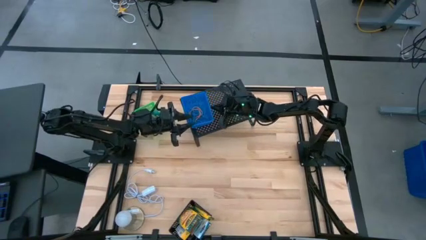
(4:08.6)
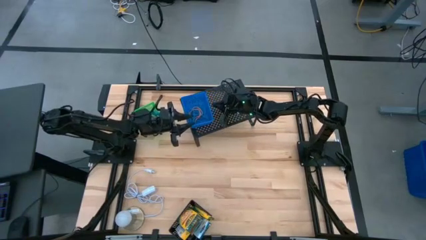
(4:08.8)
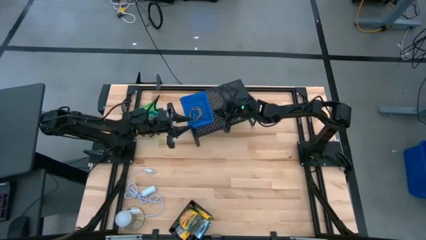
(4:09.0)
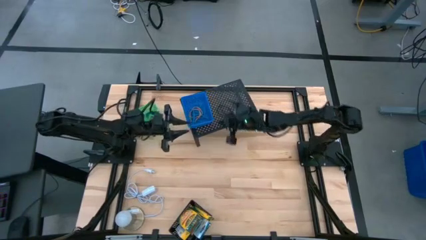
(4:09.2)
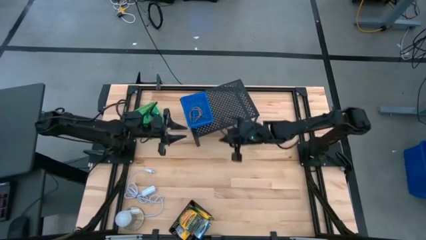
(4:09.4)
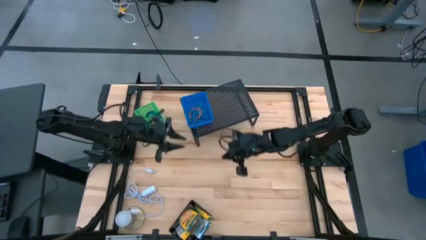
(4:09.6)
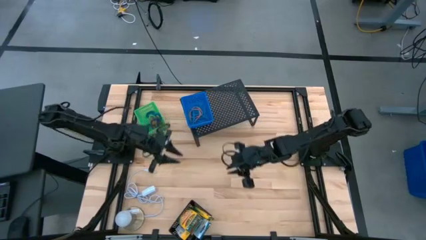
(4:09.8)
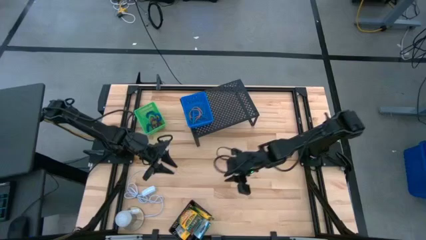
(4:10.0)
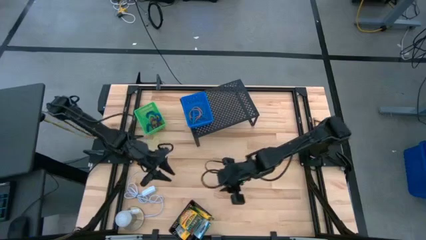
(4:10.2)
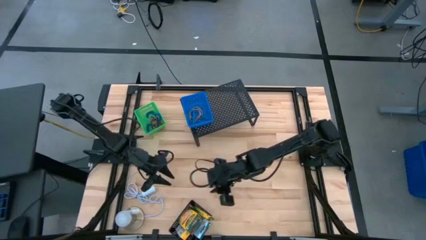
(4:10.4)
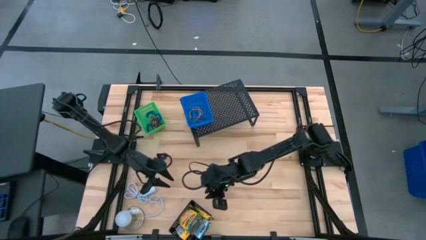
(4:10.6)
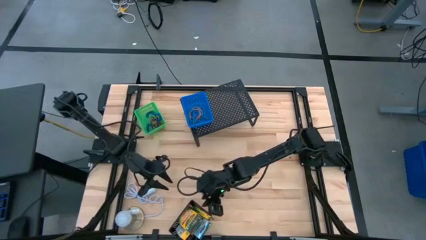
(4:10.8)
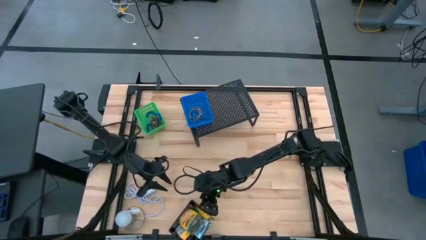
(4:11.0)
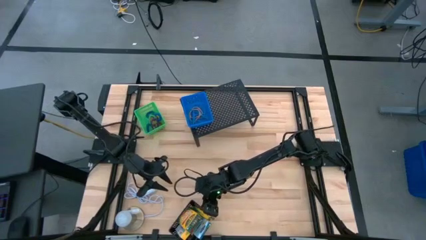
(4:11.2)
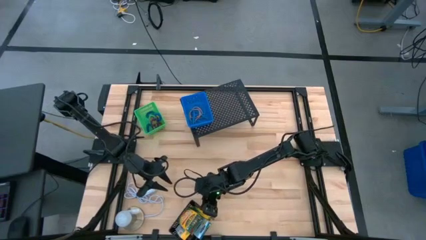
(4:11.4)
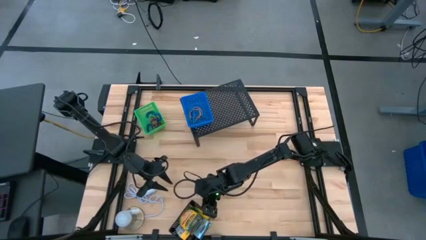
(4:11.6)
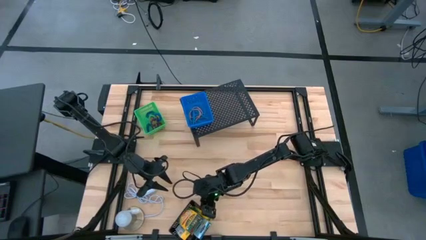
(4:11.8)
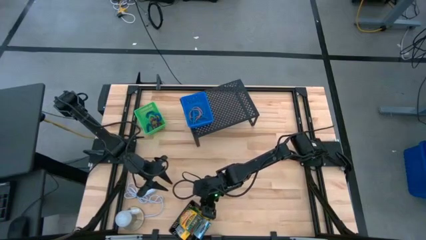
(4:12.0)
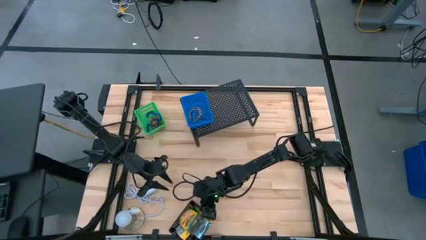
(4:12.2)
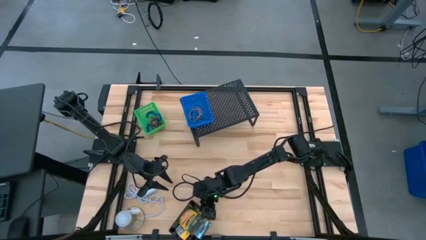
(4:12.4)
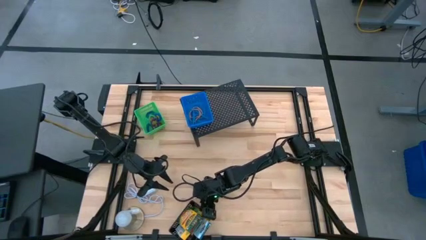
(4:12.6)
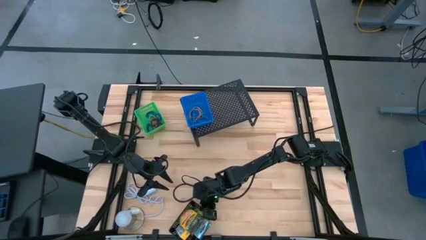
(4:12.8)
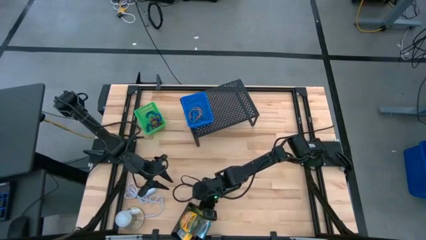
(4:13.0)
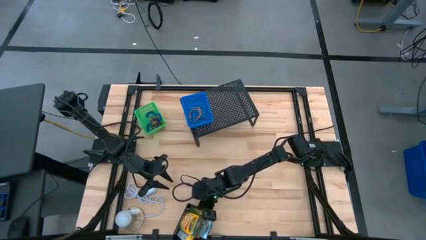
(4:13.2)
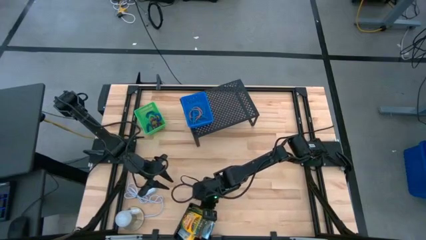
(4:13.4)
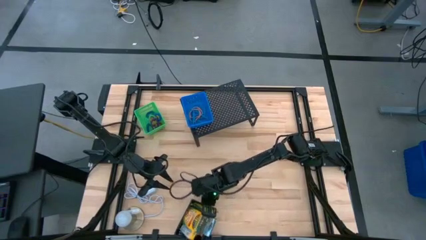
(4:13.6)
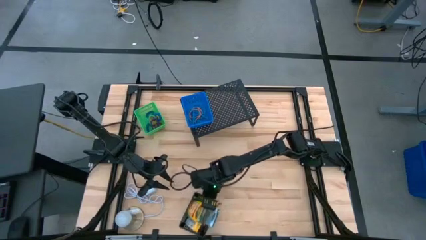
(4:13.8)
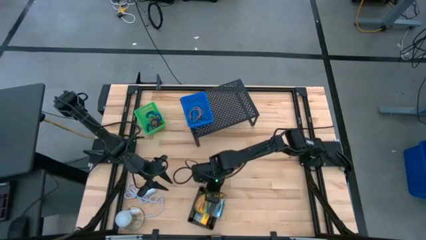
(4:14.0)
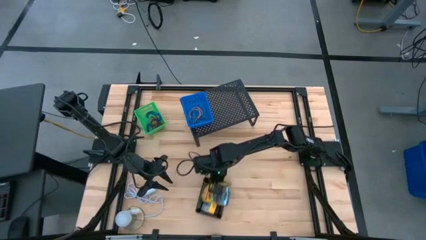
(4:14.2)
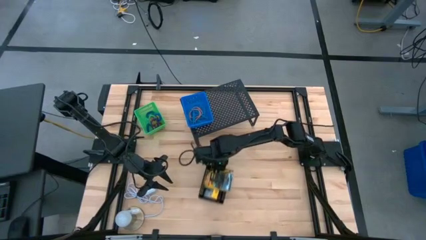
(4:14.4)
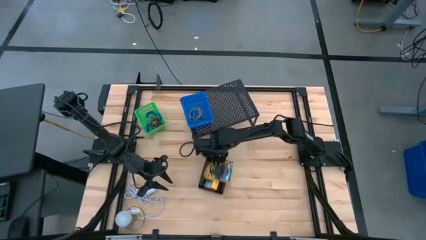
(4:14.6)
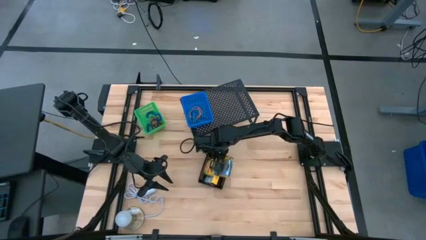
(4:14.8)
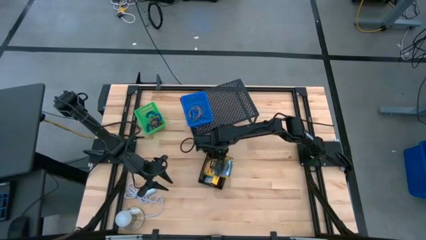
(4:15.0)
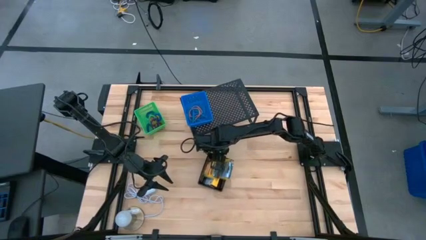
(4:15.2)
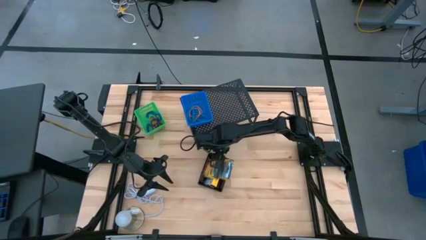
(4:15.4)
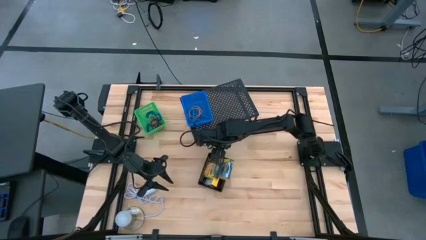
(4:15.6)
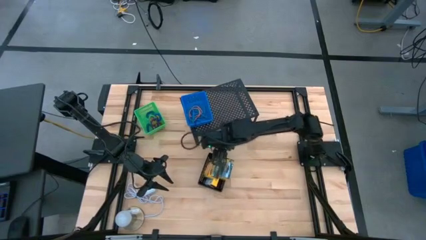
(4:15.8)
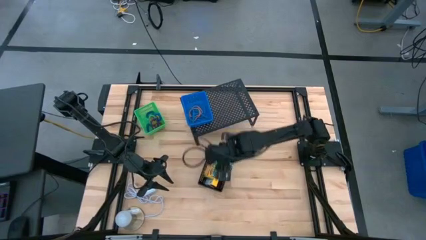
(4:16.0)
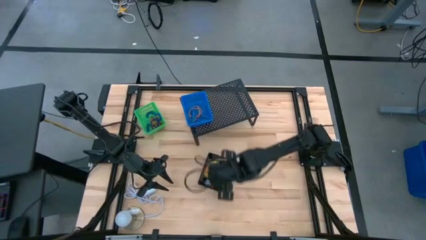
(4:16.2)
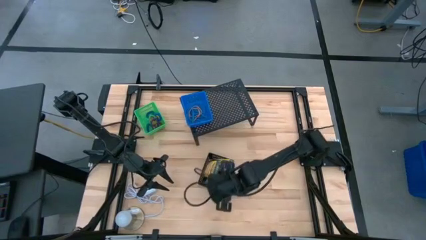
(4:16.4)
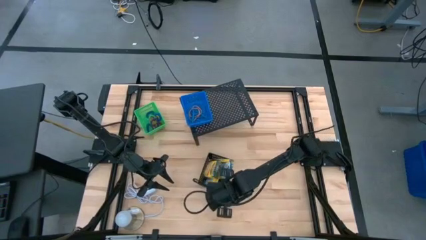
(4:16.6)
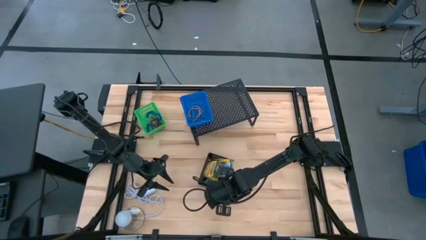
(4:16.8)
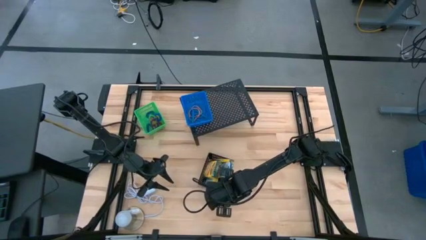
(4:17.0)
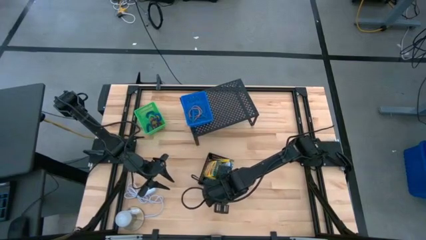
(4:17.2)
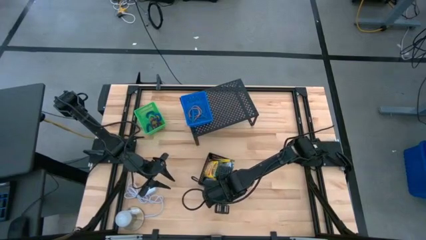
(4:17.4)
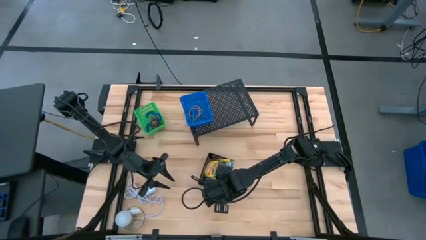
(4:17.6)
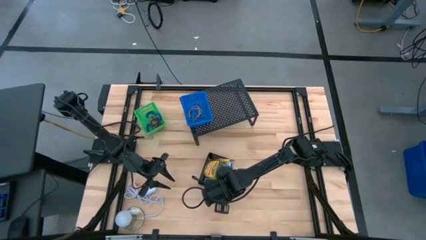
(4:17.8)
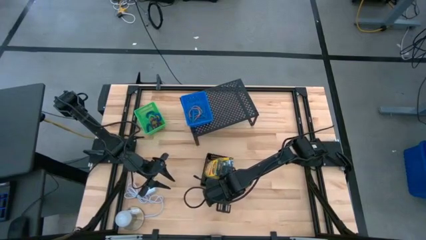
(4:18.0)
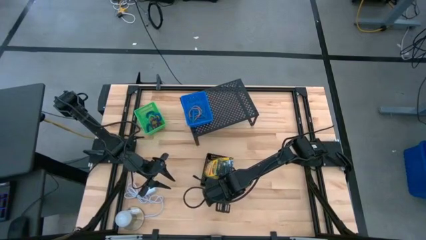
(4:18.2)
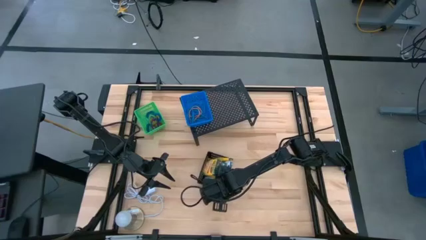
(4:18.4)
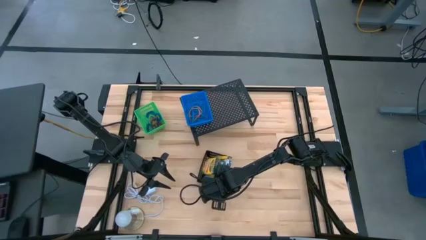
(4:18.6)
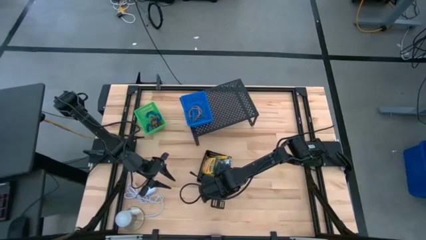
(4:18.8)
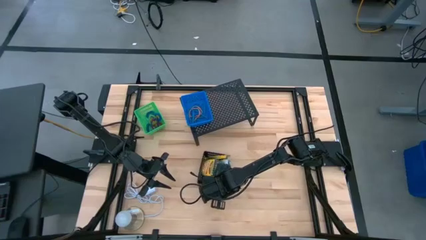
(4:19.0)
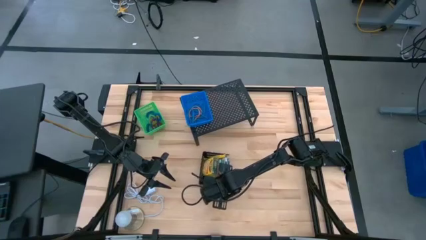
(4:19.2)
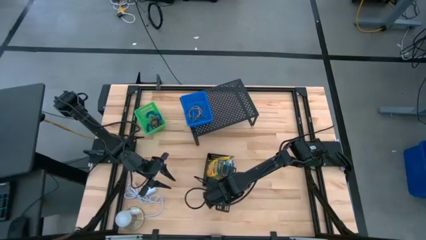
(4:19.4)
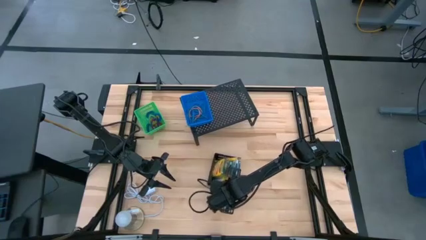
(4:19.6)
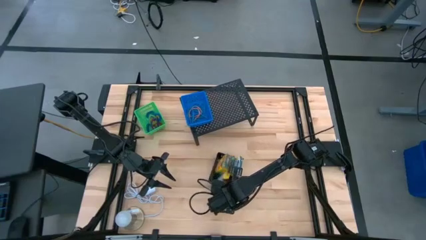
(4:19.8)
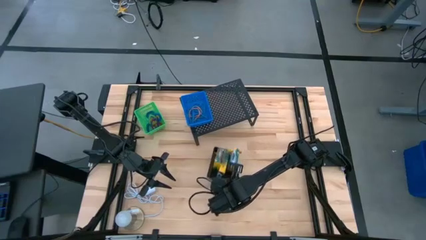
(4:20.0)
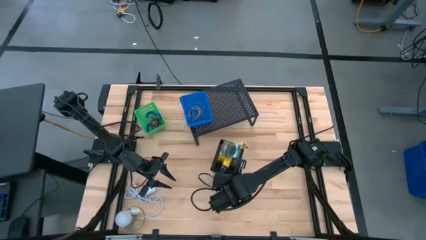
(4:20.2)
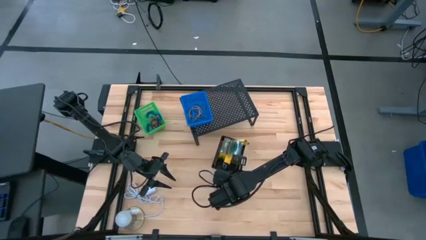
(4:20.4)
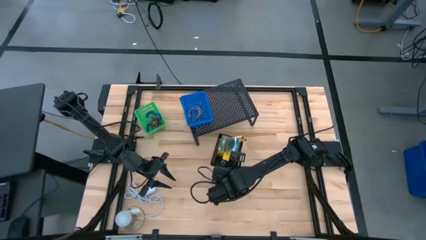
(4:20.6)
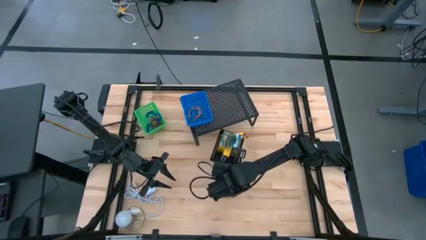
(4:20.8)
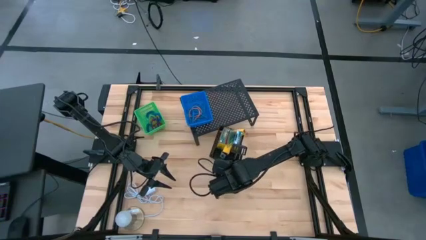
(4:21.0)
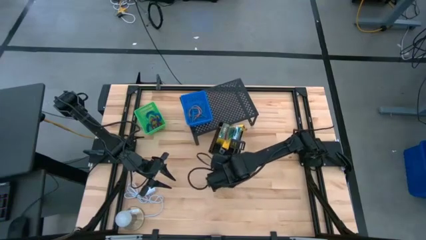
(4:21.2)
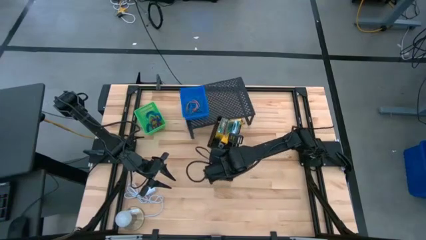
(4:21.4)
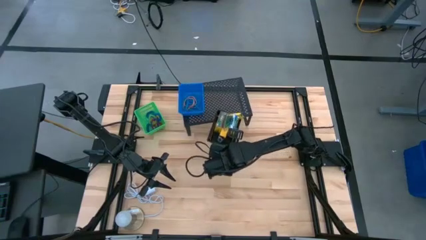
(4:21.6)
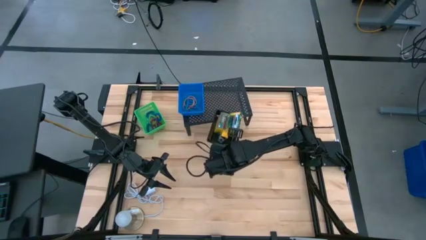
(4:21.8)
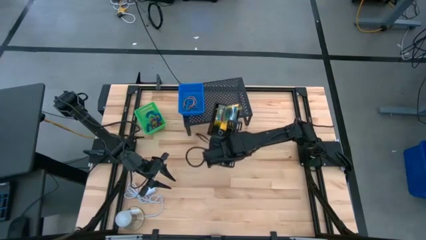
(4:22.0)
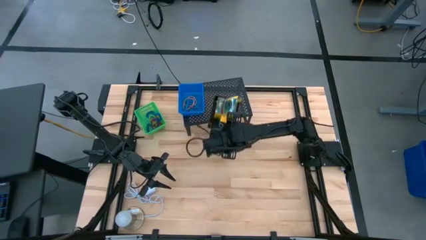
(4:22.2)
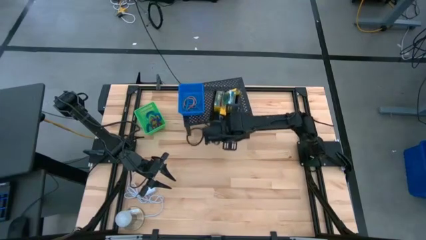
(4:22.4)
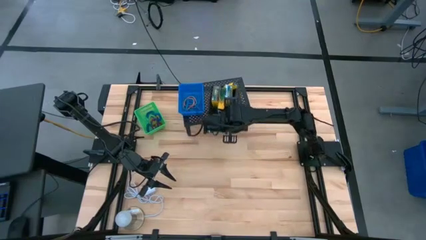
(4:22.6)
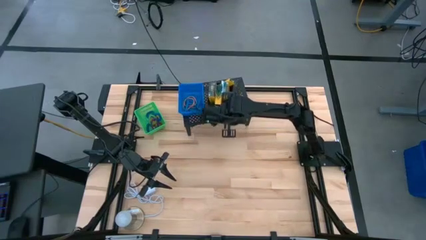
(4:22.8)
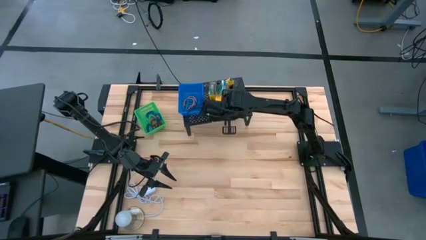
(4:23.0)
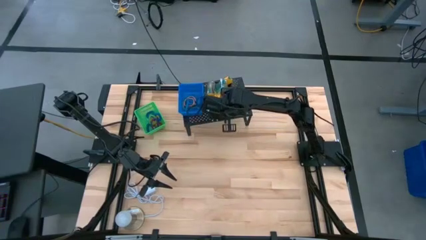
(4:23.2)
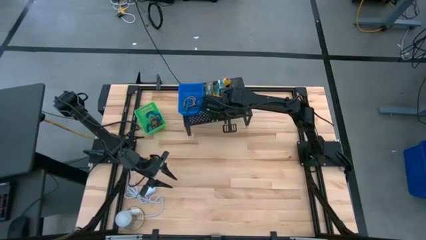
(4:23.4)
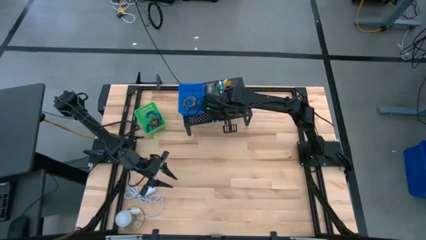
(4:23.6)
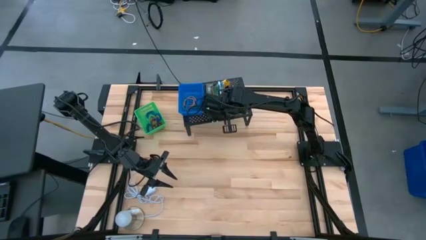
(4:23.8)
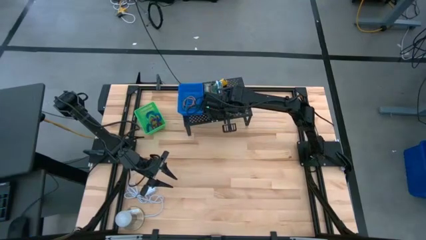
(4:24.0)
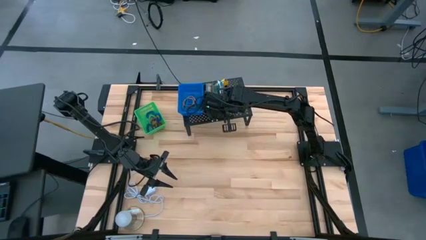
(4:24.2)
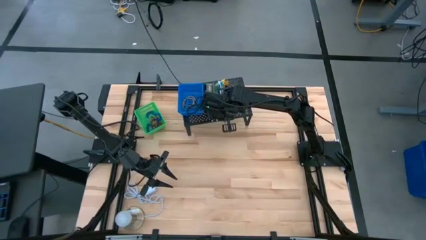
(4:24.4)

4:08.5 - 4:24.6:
Task: Pick & Place Office Desk Supplies
Put the black bin on the shelf

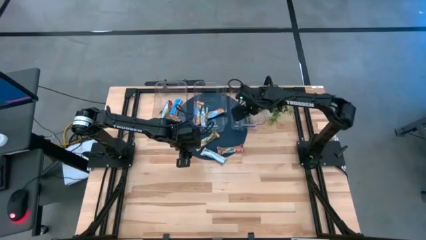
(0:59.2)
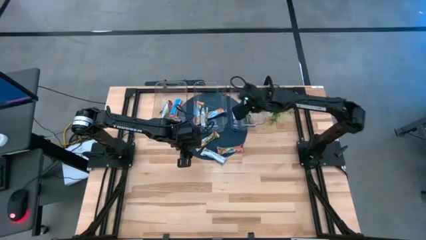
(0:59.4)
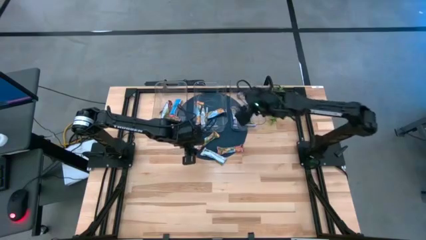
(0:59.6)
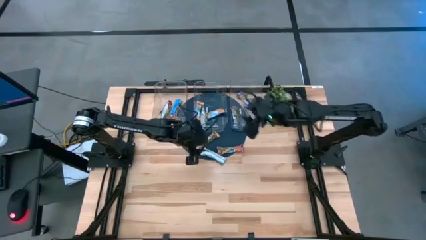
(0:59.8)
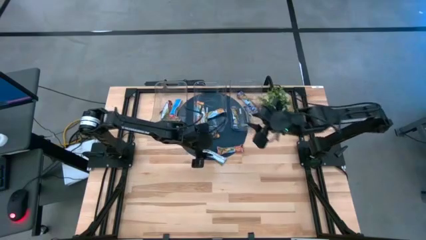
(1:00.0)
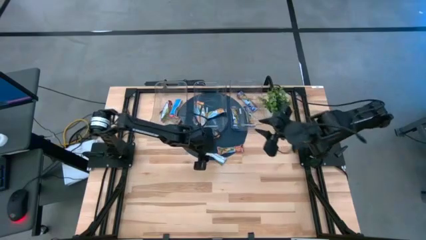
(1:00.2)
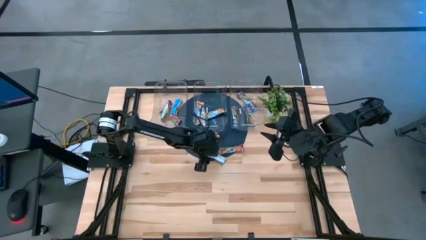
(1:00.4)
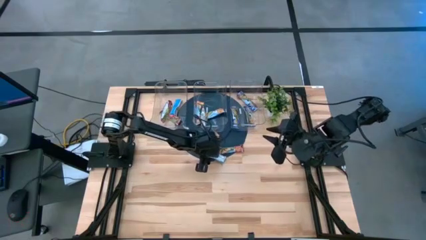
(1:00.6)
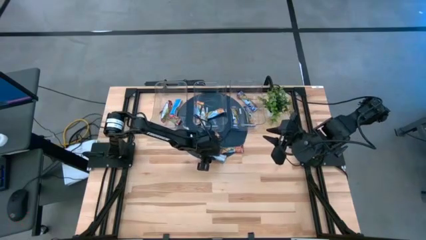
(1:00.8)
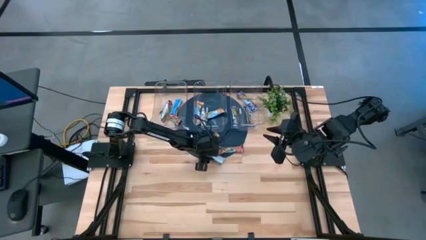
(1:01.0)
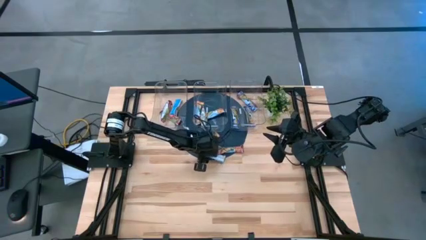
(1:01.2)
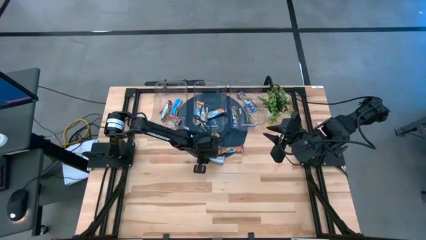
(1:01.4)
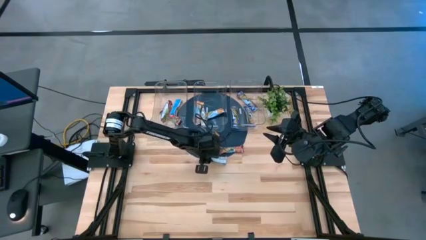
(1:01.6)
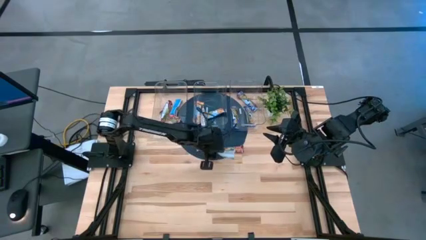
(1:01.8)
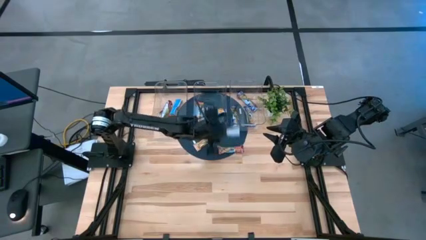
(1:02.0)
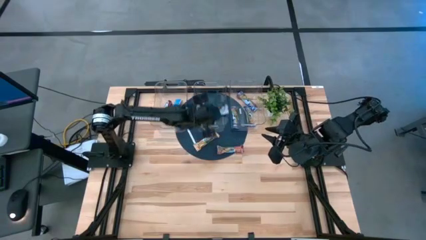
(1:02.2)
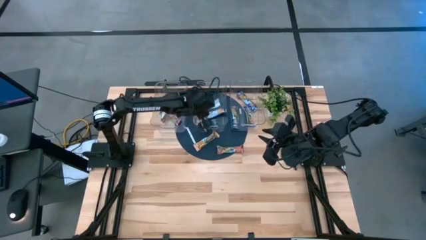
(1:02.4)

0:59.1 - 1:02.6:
Task: Pick and place Granola Bars by type
Put the yellow granola bar into the middle transparent bin
